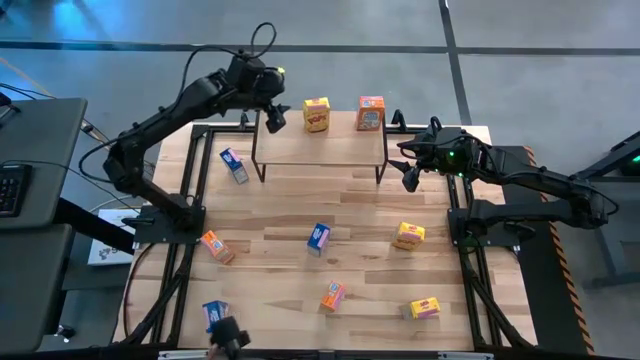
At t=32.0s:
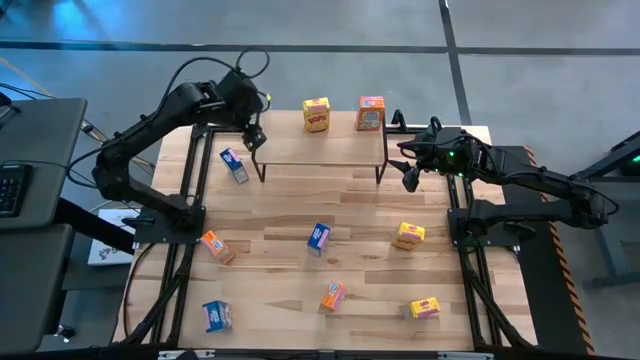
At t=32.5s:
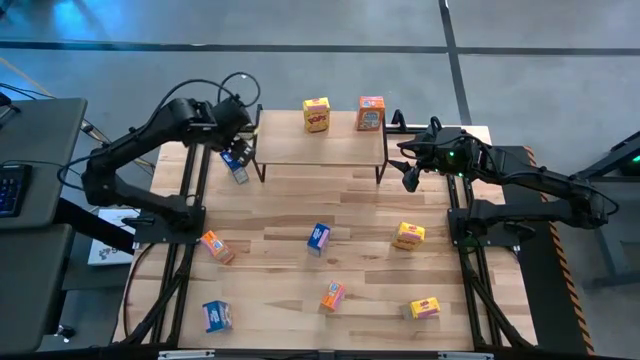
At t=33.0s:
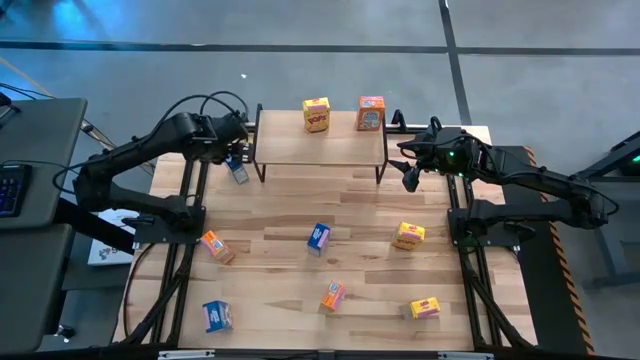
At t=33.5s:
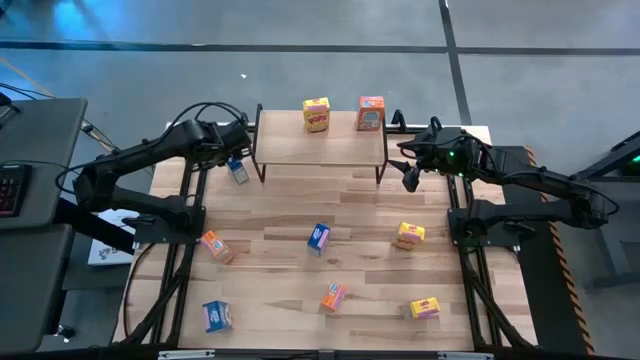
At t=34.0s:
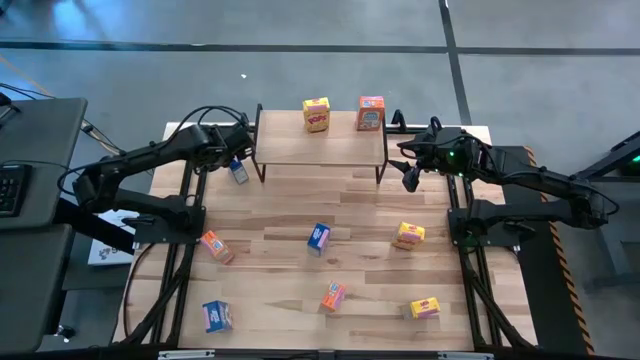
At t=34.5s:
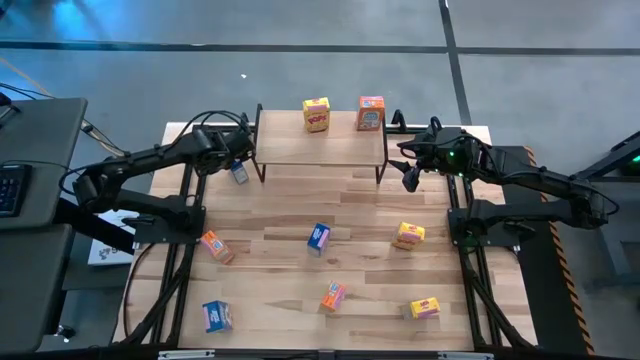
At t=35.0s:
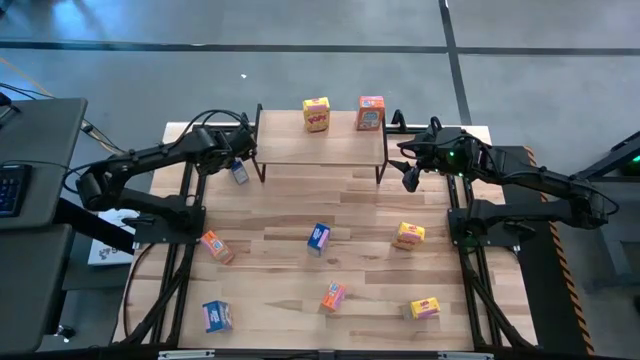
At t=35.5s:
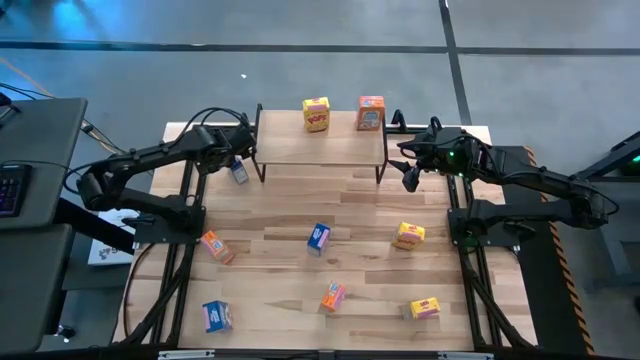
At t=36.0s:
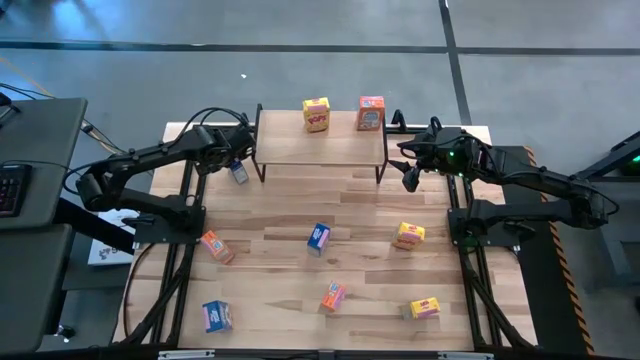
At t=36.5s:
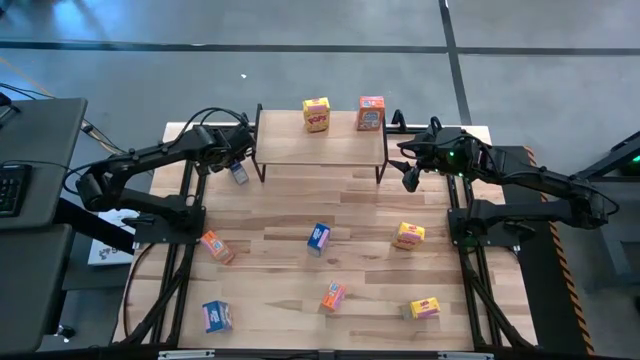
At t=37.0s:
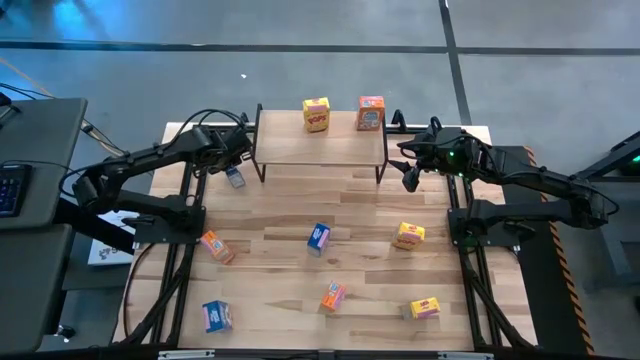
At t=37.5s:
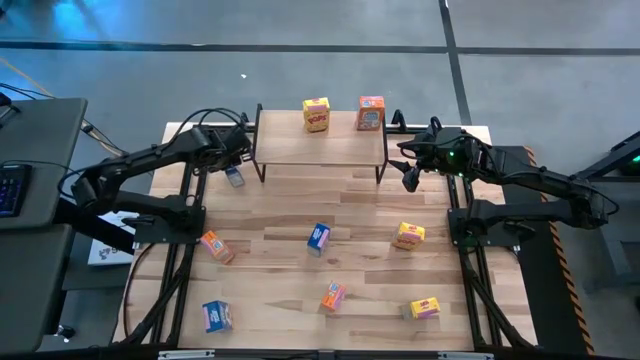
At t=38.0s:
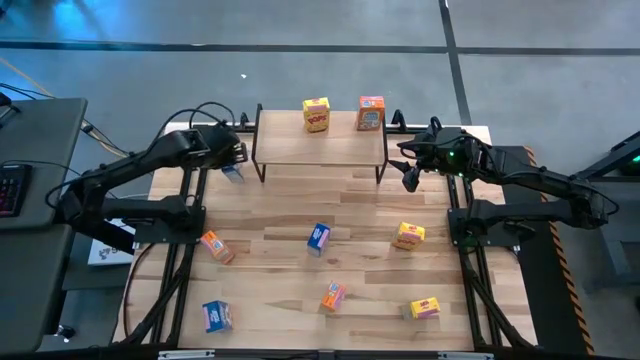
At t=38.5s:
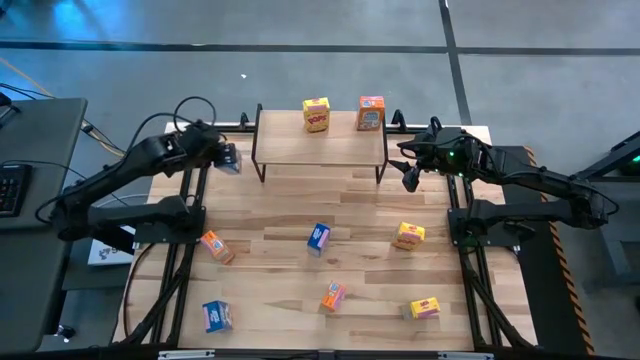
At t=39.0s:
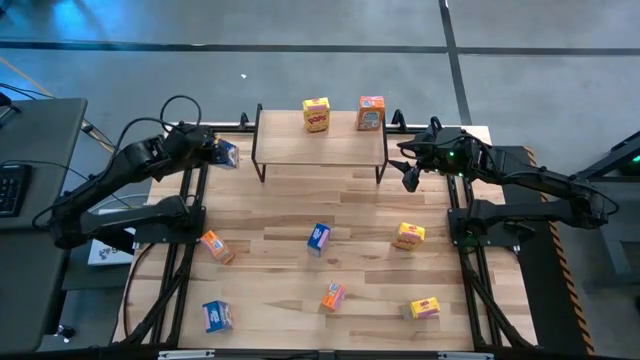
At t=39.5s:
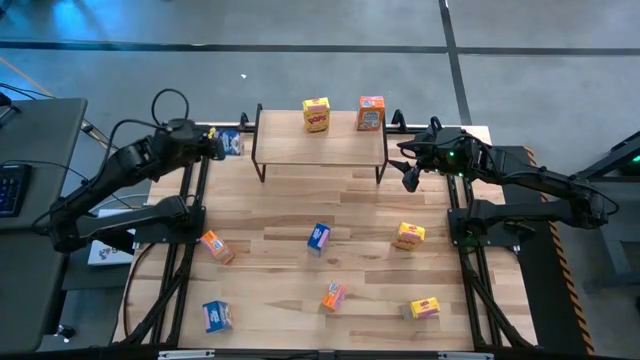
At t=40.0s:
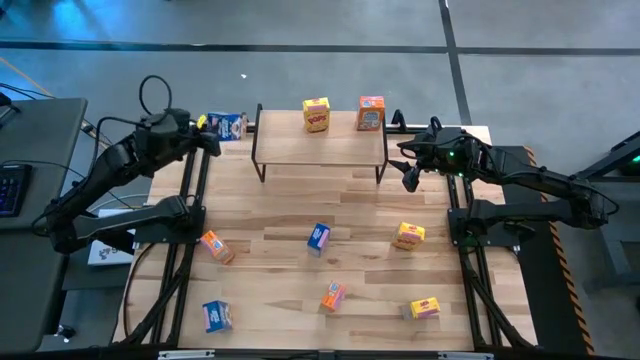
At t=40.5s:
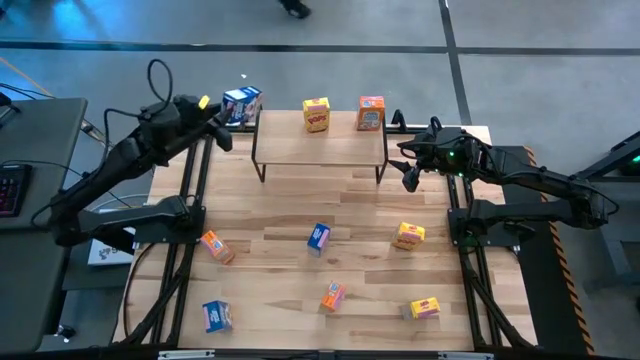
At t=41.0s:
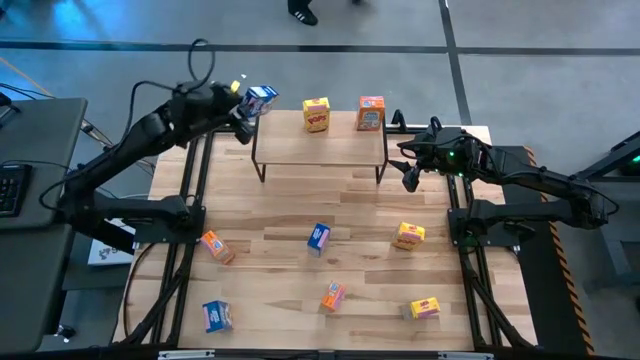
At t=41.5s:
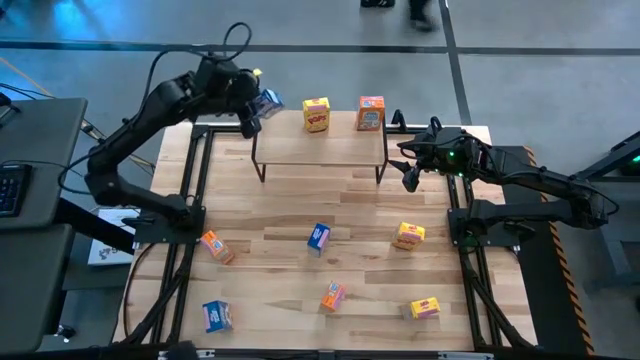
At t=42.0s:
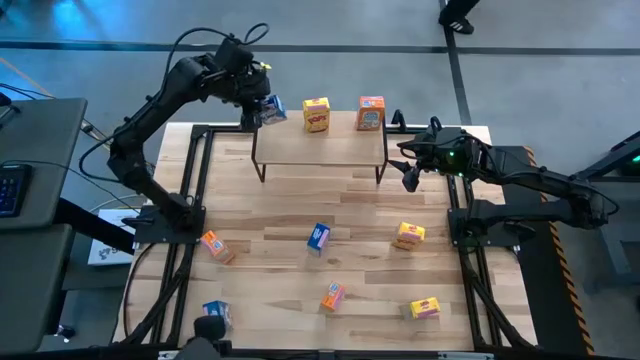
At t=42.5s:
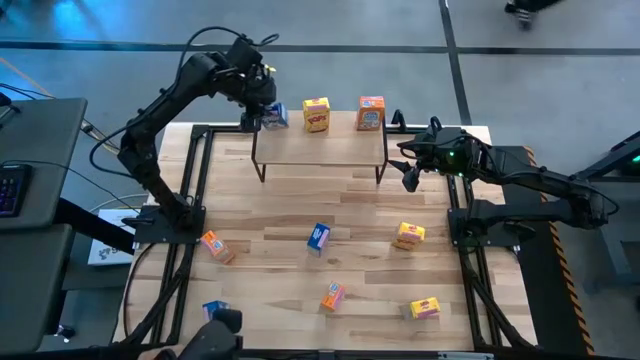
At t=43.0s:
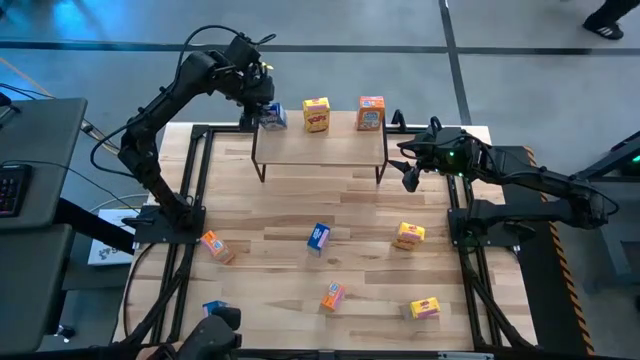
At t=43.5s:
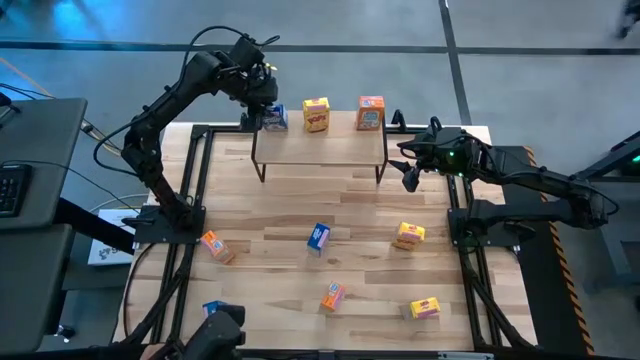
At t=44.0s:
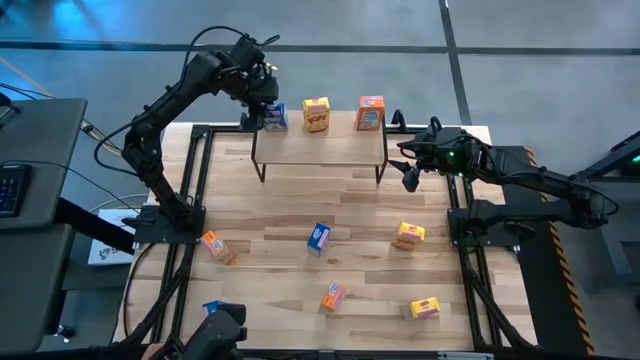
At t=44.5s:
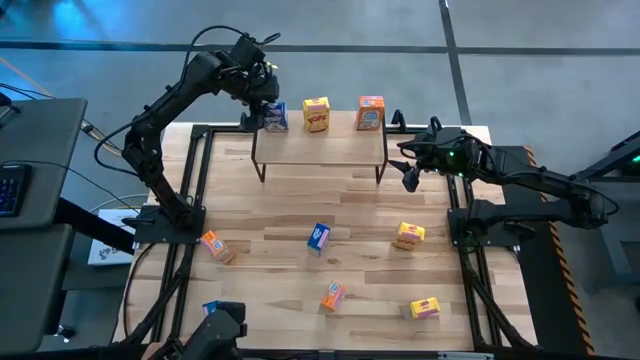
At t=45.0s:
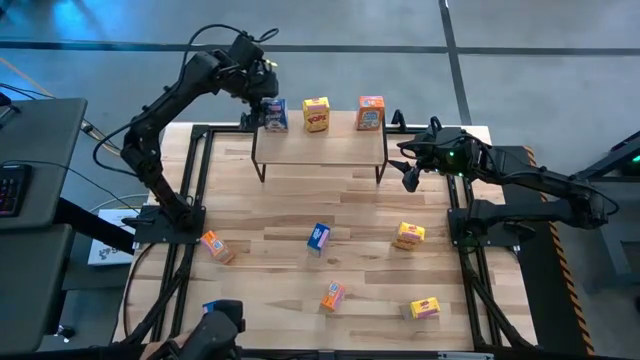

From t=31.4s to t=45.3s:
Task: Stack cereal on shelf
Put the top blue cereal box on the shelf

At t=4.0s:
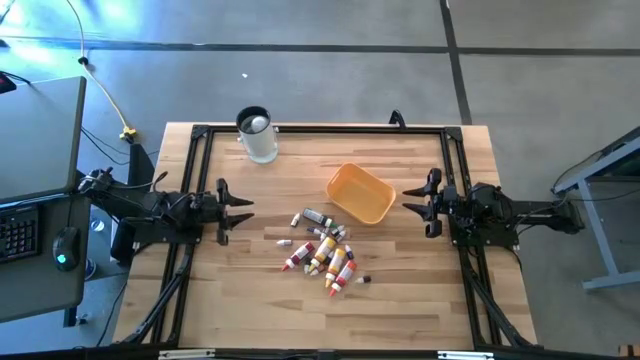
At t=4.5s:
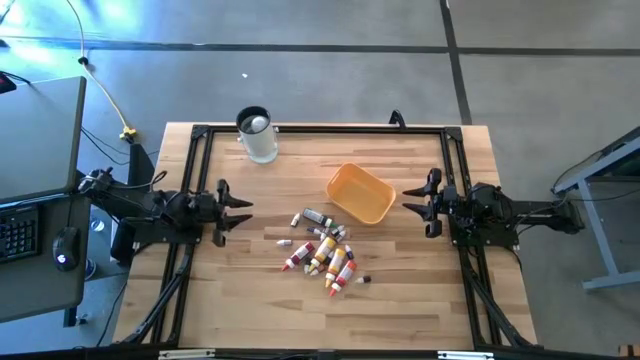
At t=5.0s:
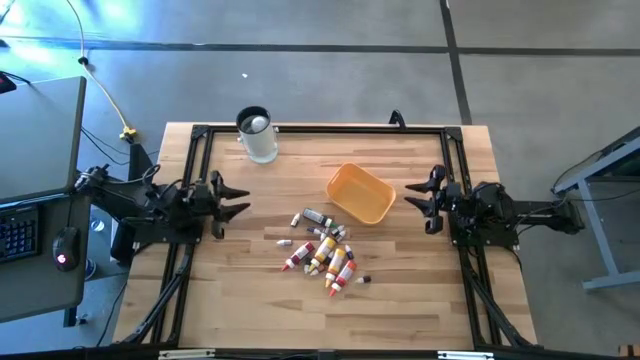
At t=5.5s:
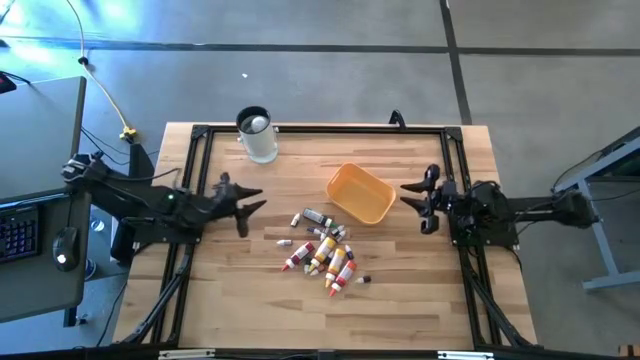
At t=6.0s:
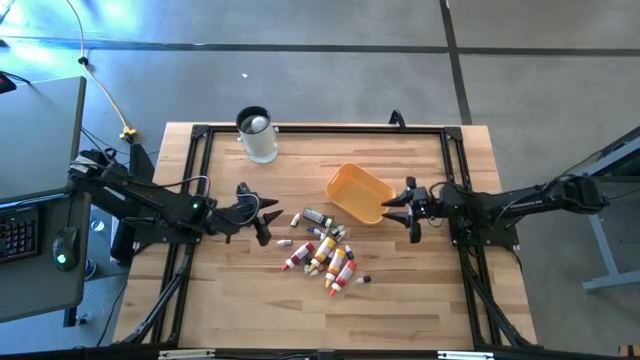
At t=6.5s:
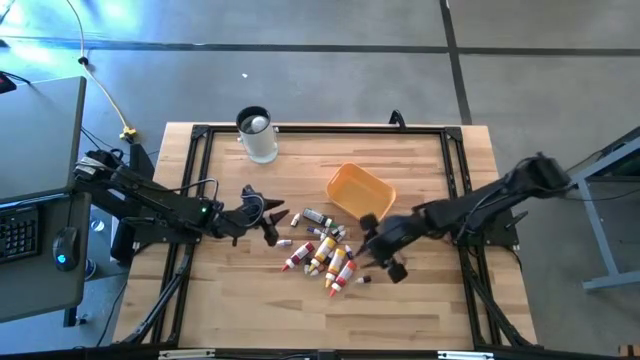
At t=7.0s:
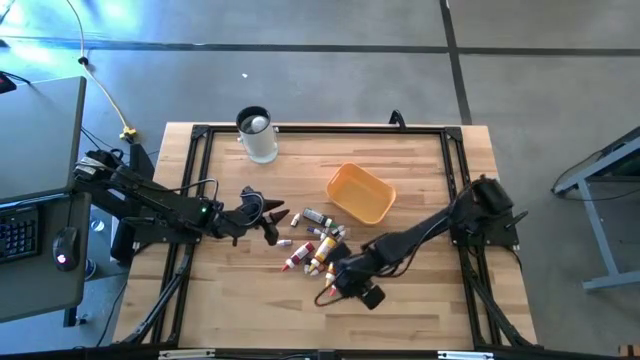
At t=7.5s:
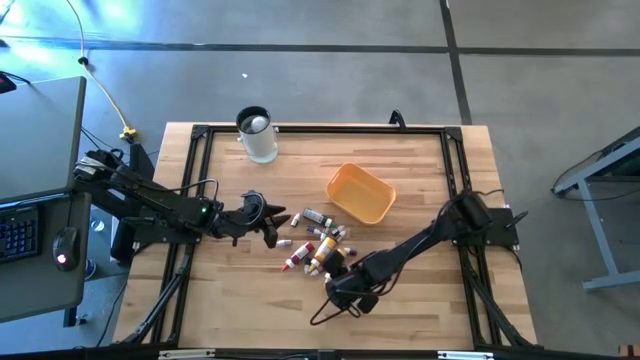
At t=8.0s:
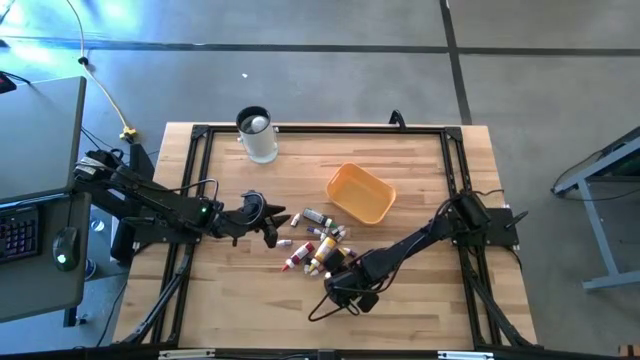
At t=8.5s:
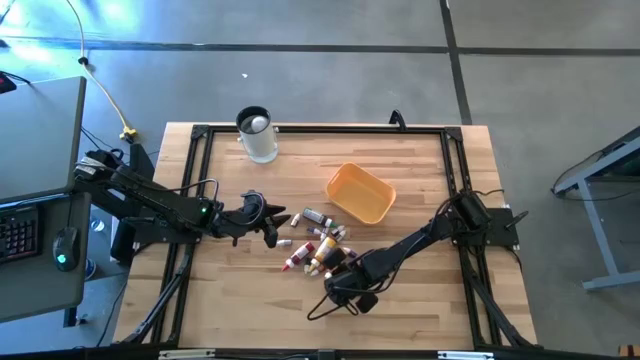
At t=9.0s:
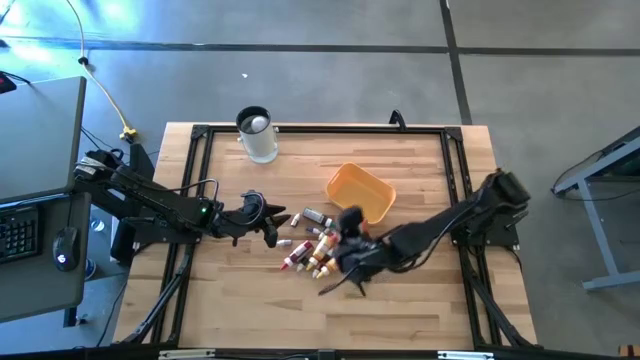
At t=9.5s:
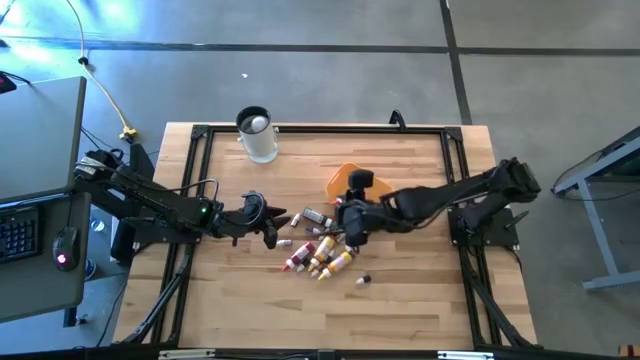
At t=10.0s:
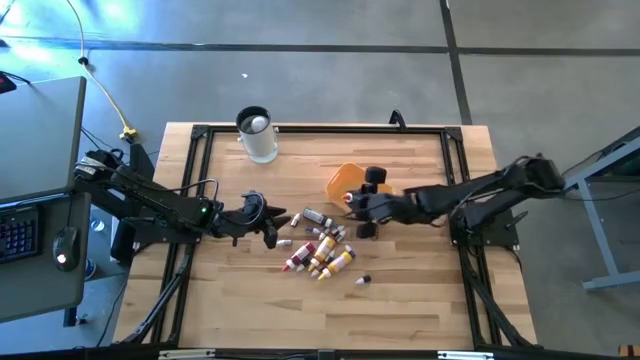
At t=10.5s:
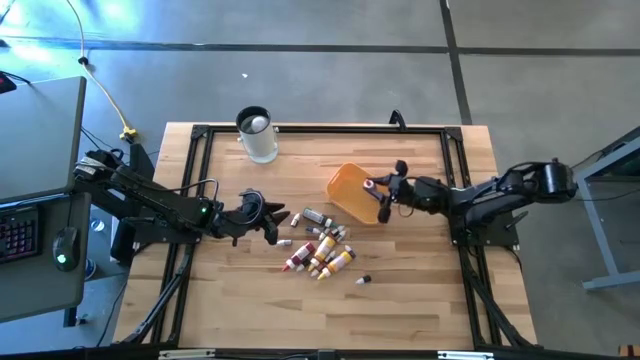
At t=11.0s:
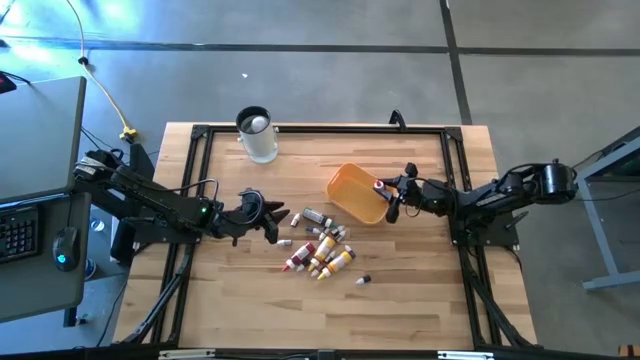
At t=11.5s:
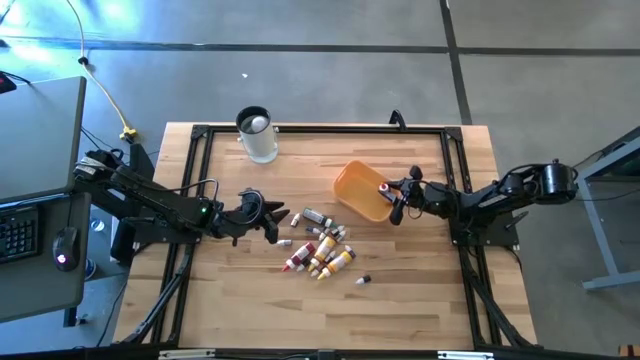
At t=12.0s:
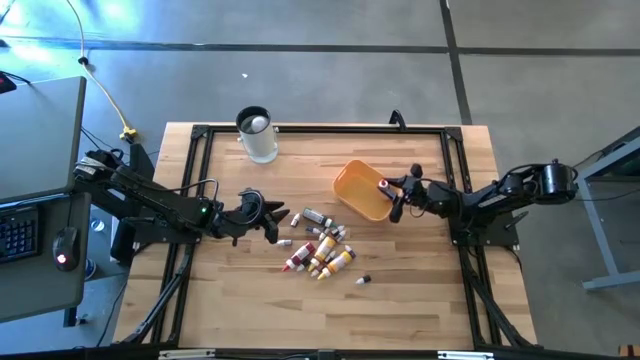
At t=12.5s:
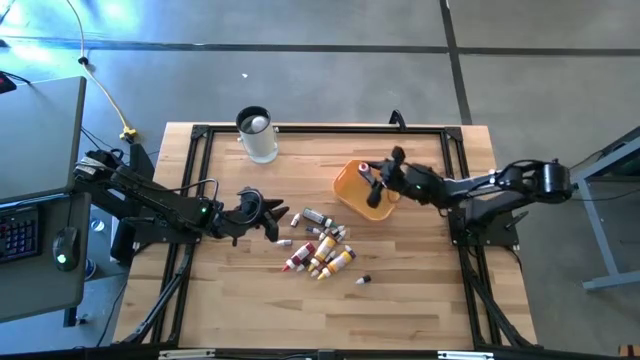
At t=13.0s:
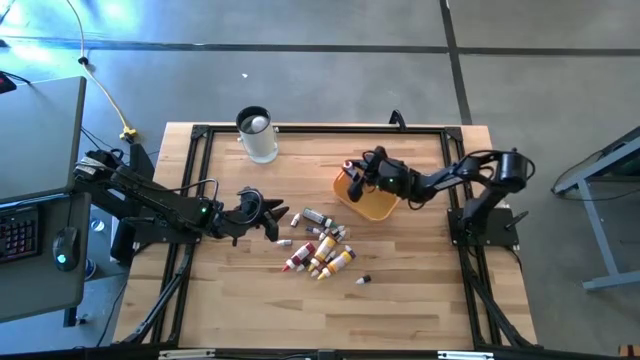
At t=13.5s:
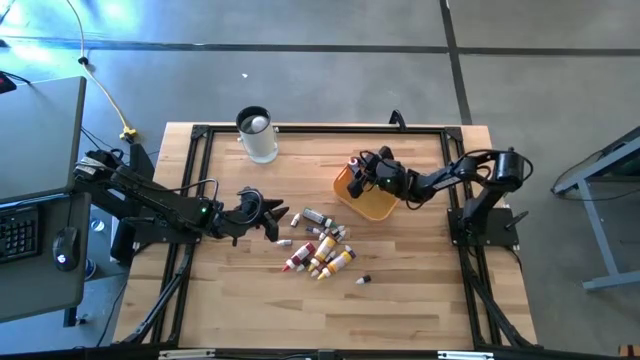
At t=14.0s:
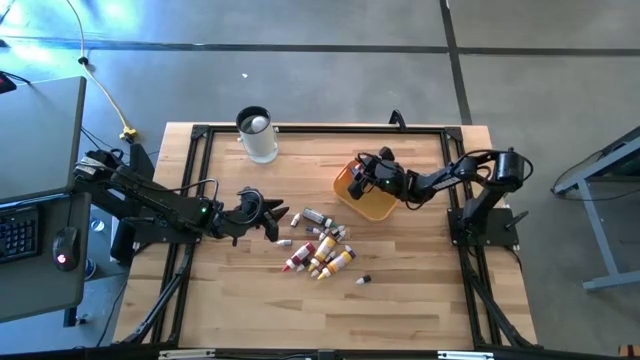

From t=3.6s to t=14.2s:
Task: Pick & Place food coloring
Put the large orange food coloring bottle into the yellow bin
